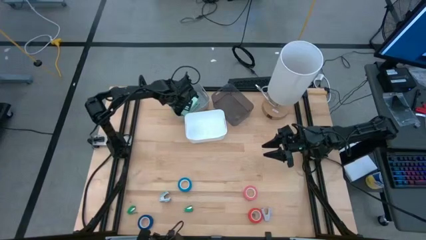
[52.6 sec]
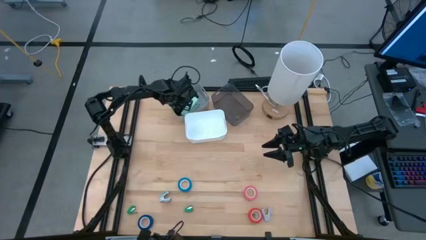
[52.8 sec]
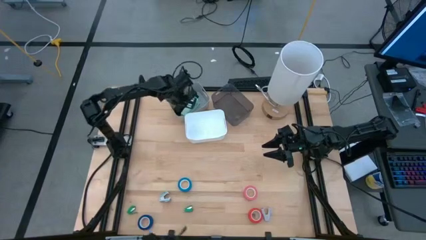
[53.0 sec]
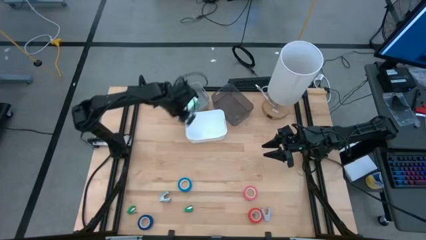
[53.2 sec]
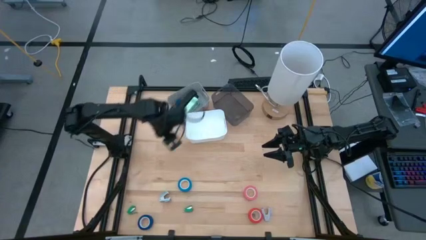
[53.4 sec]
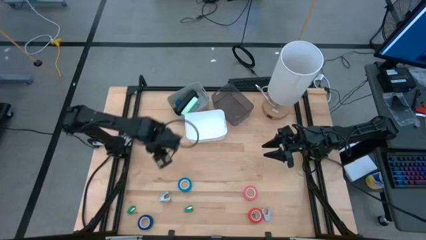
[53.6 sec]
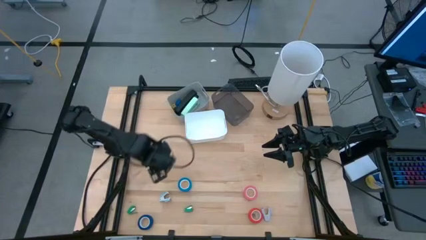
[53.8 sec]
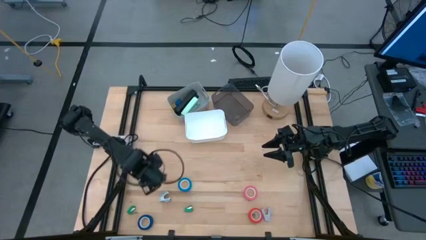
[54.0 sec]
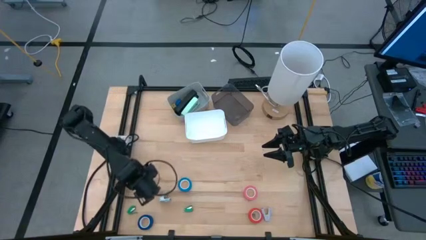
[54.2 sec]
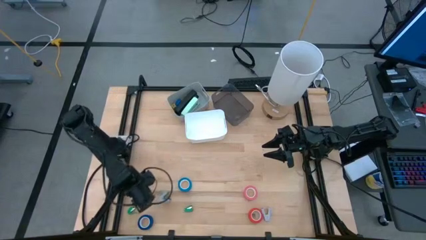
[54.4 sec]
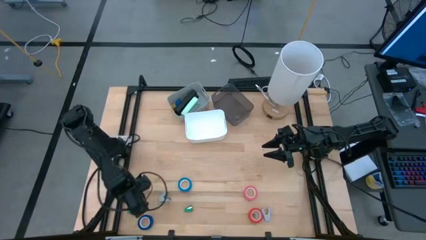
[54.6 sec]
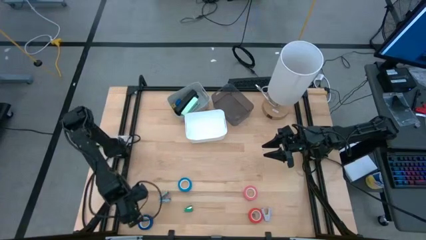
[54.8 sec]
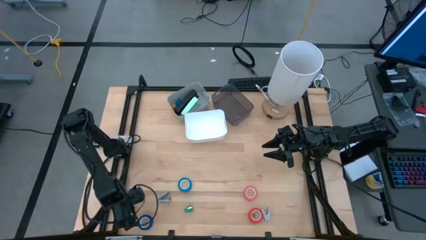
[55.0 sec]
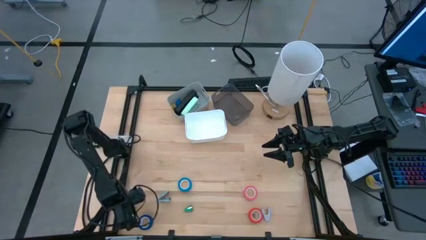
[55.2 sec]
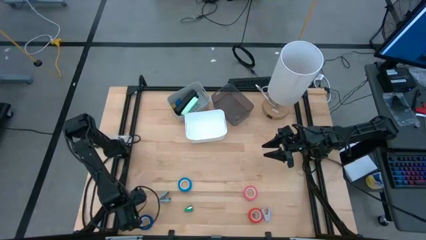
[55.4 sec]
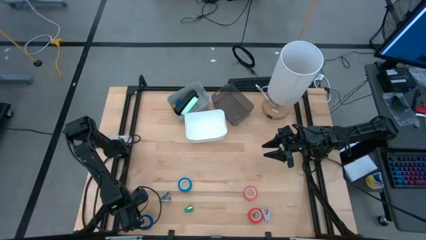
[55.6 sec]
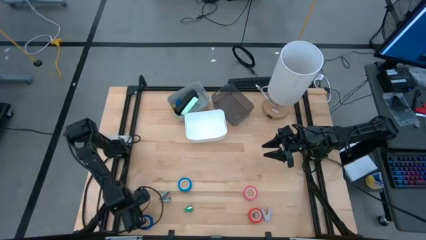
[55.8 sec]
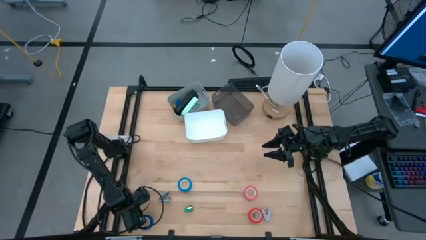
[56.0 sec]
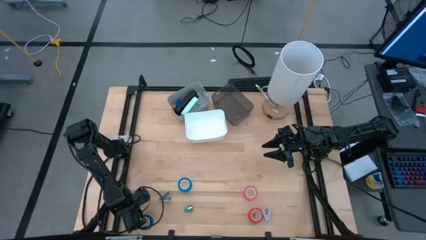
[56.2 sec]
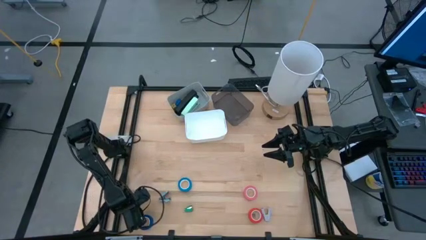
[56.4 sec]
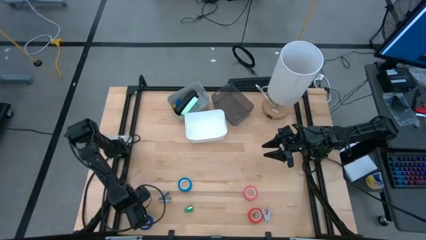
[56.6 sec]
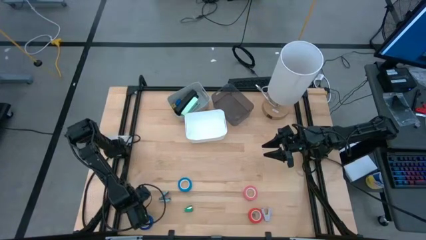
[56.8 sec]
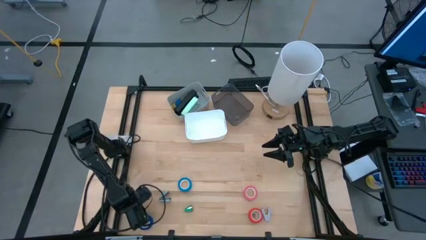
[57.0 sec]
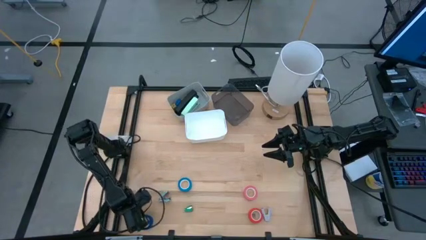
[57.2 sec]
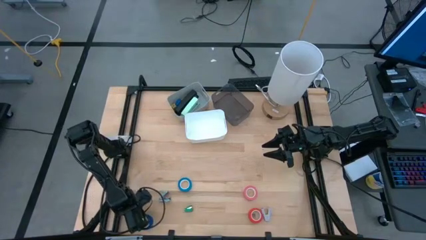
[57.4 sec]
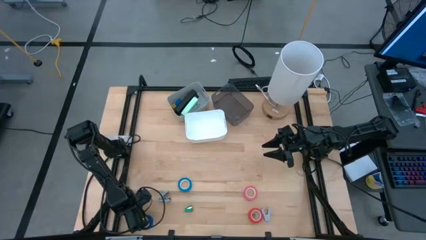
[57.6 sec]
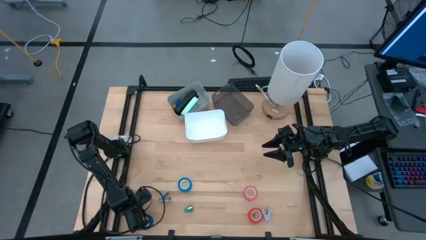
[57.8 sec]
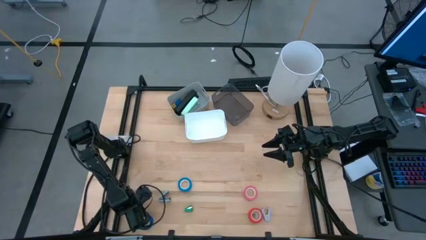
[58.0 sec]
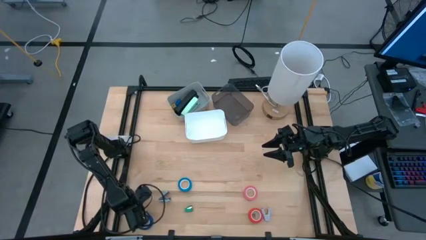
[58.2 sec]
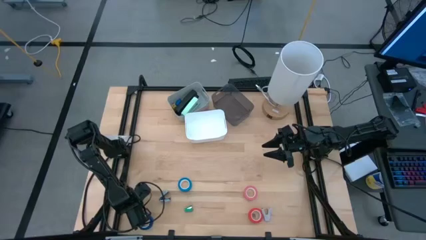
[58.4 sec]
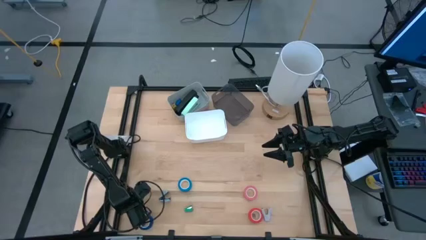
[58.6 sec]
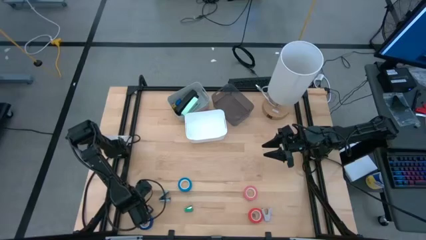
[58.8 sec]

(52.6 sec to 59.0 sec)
Task: Pick and place Stapler, Stapler remover, tape
Put the left small green stapler into the gray bin

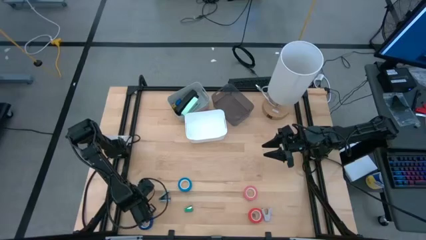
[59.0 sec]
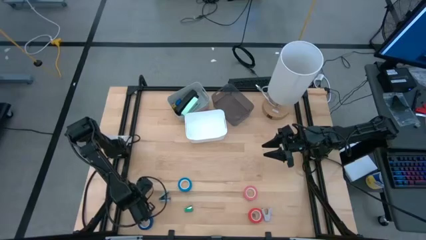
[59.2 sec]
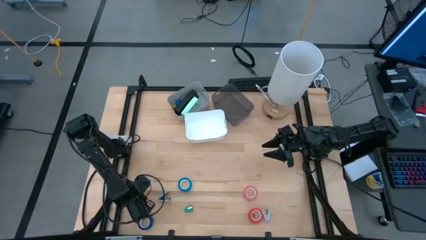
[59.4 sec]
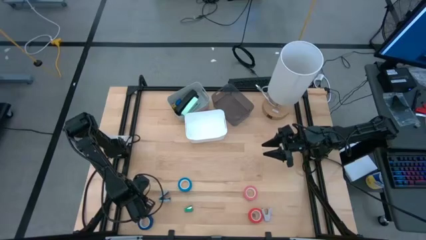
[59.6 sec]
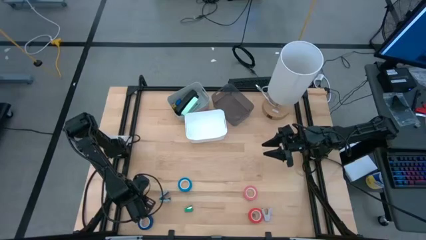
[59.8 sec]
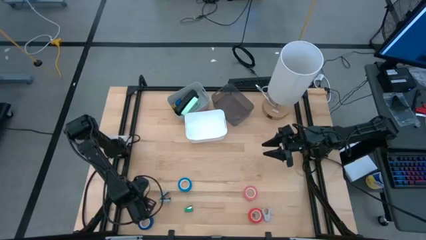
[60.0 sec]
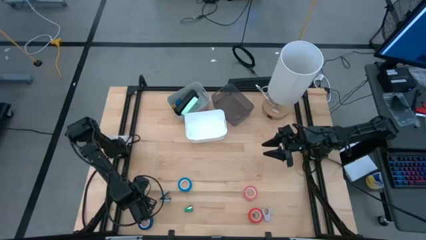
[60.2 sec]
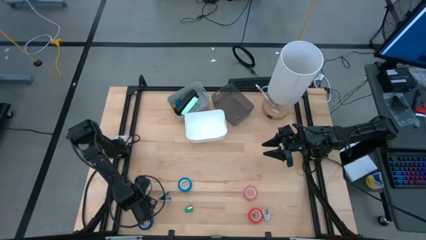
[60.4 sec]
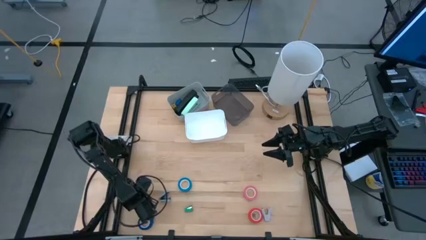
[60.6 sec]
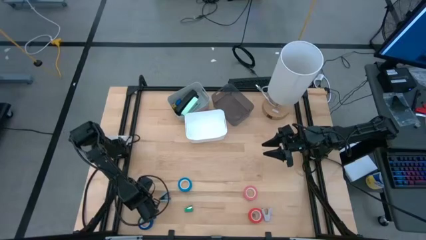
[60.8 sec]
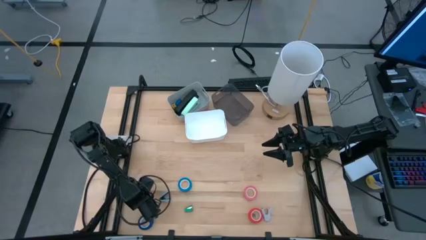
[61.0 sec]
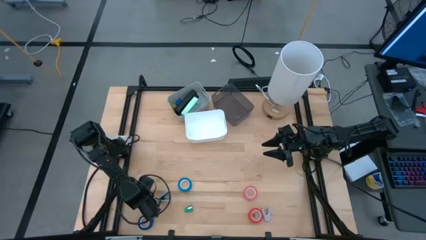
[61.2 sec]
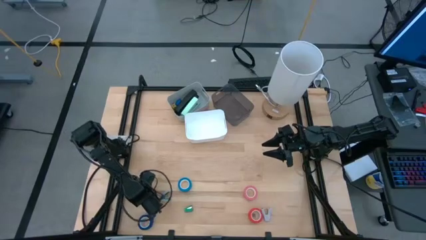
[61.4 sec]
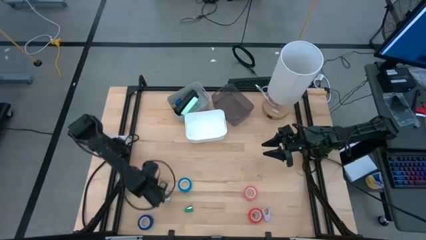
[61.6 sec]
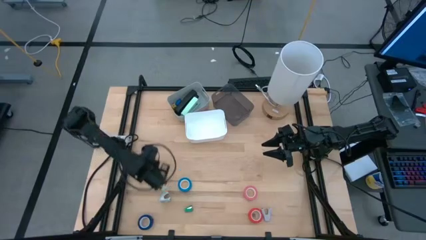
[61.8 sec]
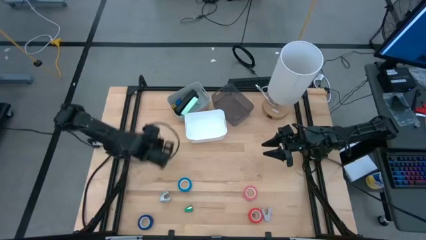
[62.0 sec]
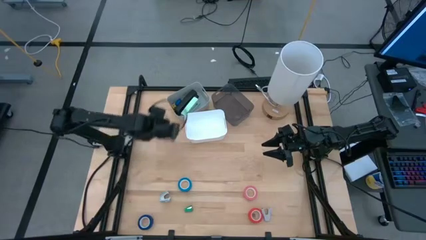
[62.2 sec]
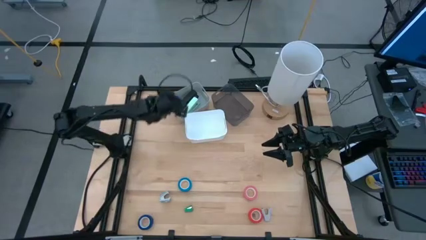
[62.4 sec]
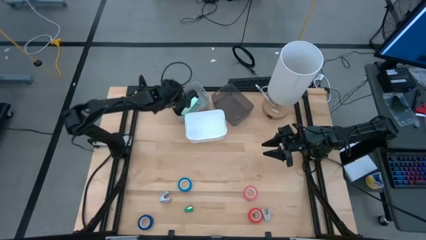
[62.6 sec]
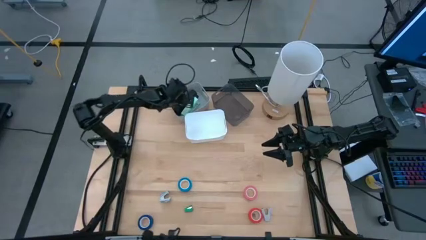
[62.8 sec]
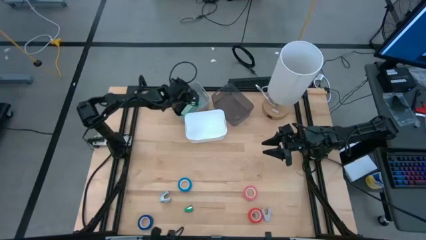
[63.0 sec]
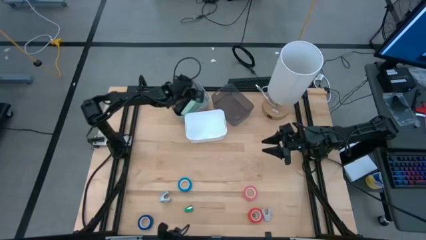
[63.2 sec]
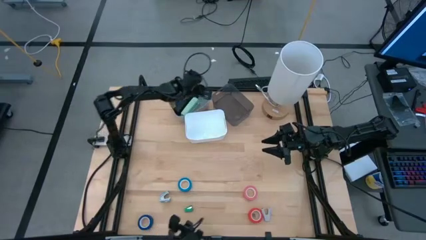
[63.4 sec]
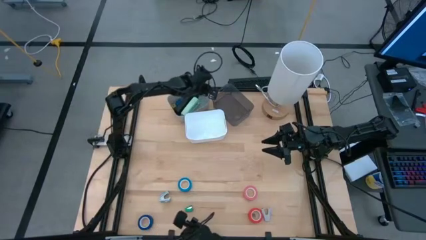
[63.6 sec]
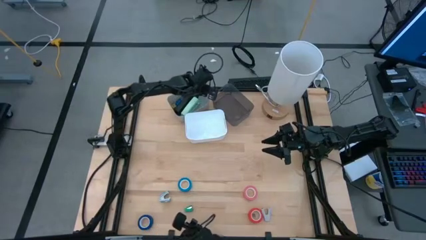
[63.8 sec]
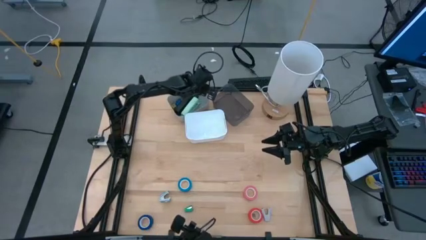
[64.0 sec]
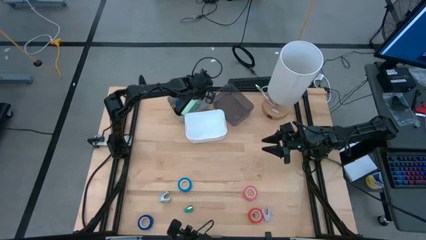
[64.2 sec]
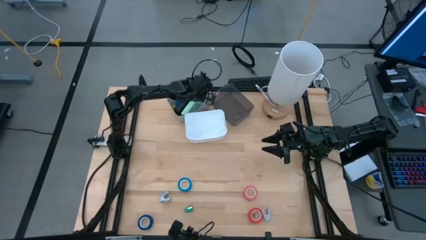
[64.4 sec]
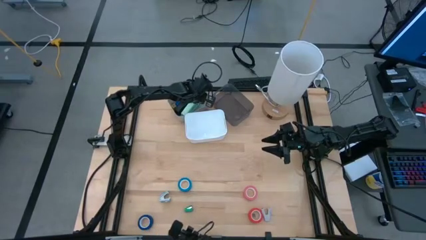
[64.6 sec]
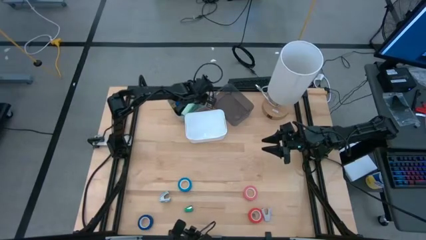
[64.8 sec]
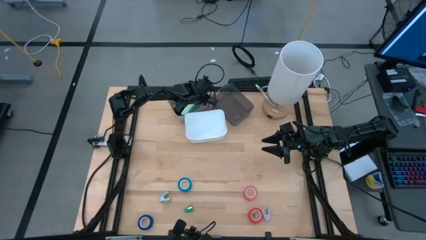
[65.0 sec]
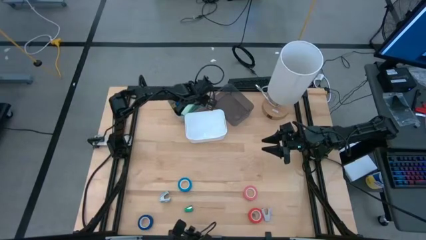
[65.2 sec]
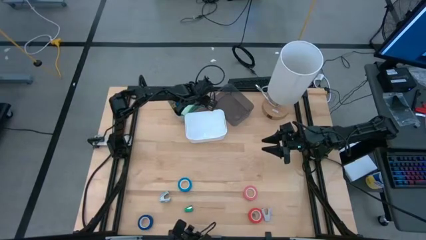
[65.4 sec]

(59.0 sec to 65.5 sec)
Put the left small green stapler into the gray bin

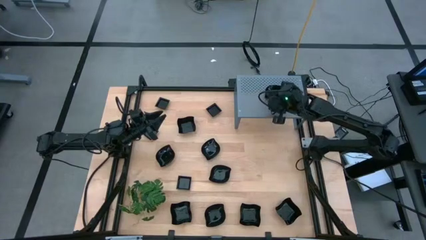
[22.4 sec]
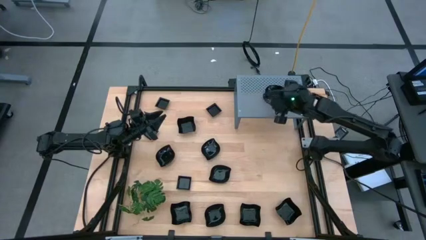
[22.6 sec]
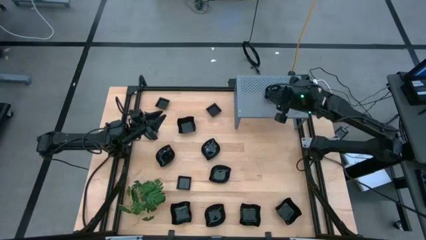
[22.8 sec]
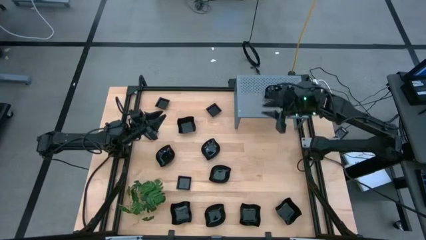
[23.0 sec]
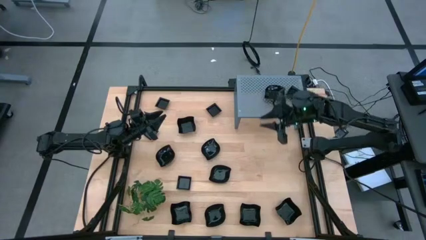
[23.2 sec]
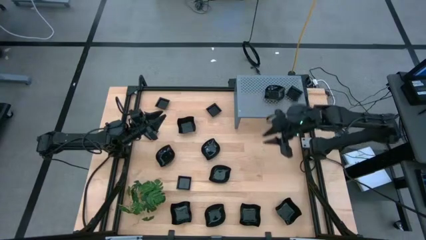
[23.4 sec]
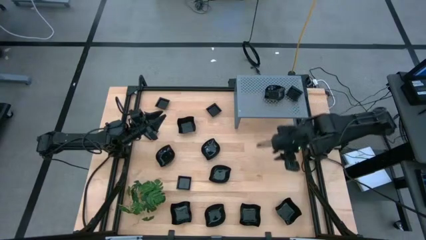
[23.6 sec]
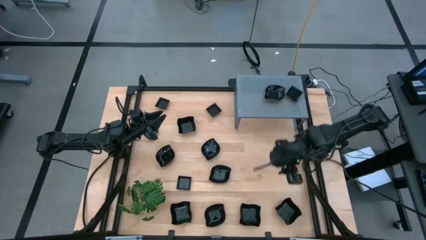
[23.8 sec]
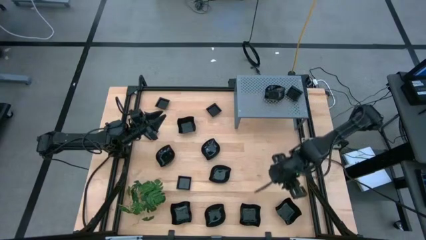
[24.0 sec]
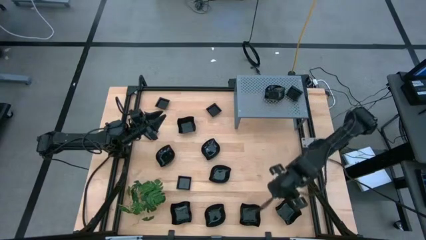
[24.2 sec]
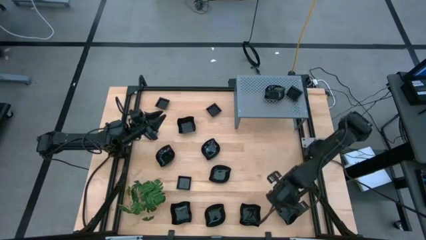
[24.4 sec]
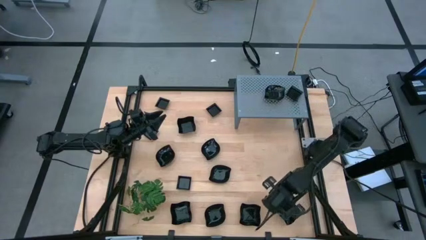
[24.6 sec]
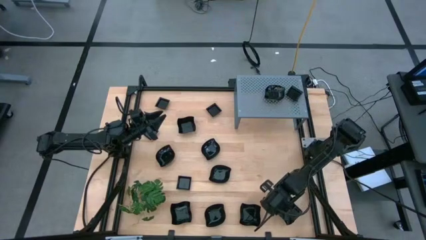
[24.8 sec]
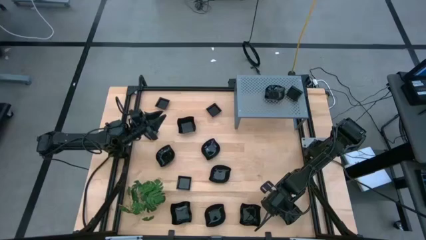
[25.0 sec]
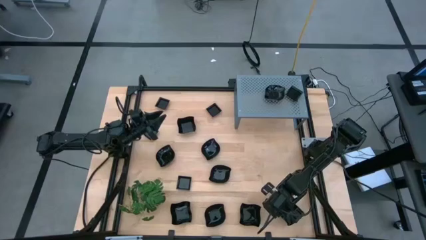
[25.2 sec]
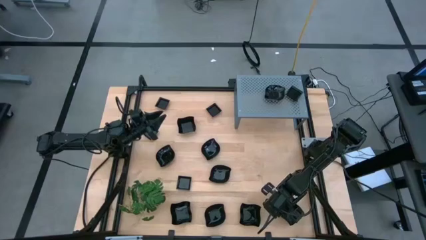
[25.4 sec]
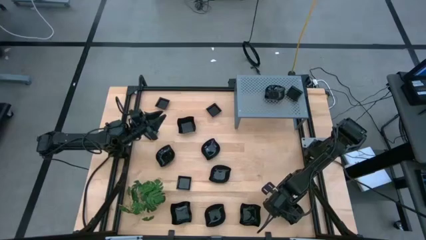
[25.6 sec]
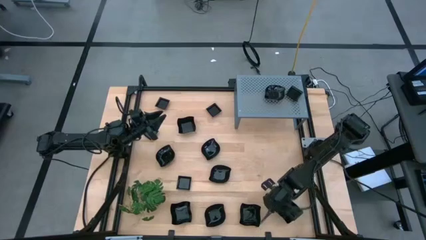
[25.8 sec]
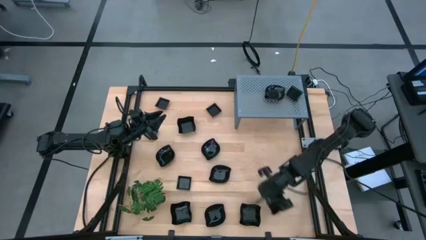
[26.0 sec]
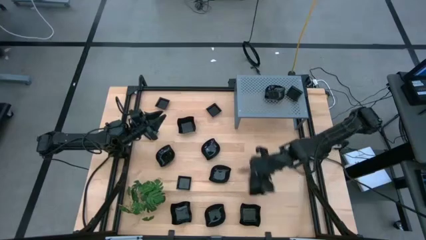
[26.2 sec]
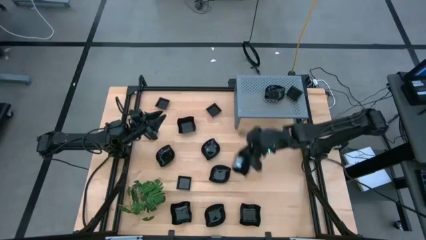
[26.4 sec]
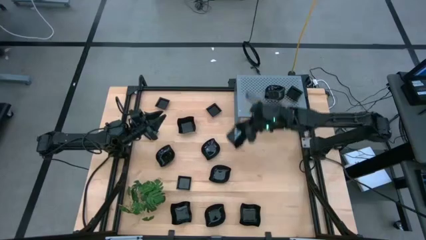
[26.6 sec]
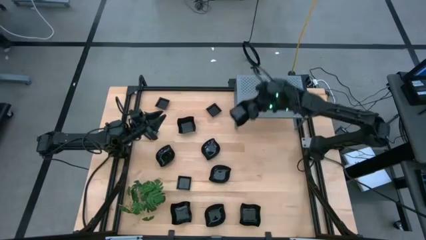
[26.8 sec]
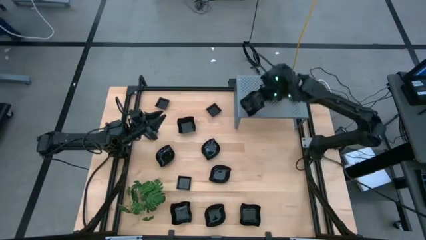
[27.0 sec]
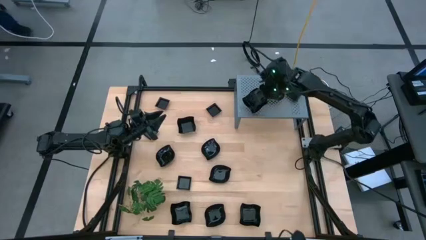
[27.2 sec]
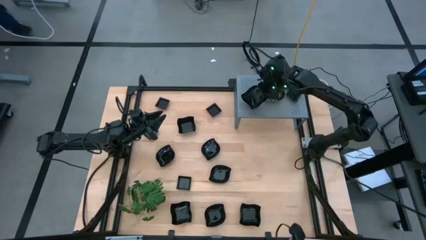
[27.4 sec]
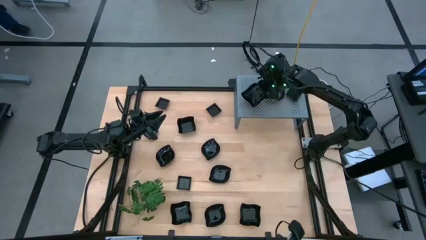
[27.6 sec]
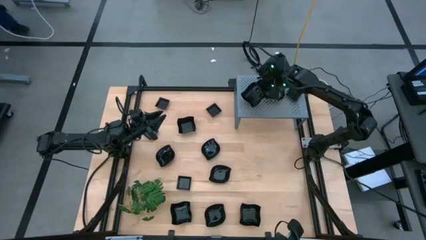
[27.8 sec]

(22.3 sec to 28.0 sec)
Task: Pick & Place Mini shaped plates
Put the black distorted square plate on the shelf
